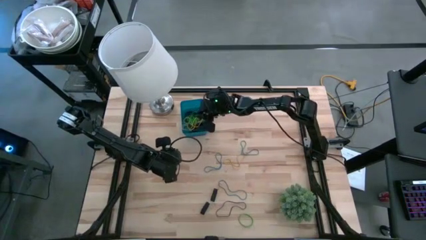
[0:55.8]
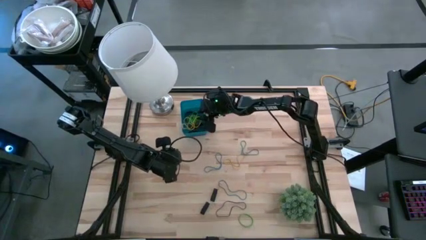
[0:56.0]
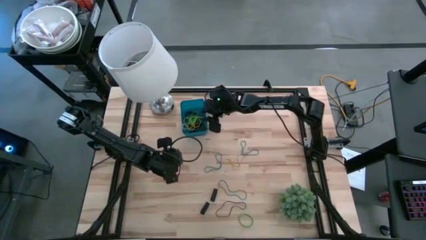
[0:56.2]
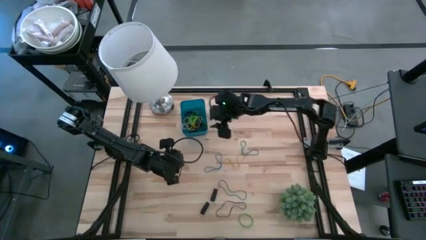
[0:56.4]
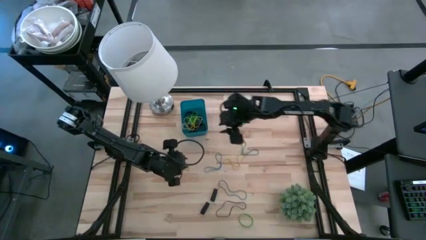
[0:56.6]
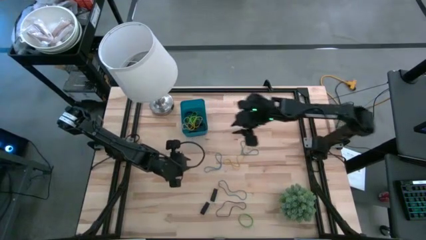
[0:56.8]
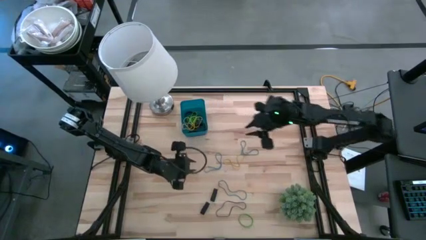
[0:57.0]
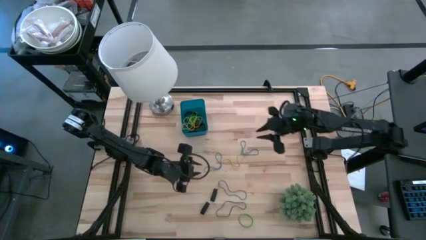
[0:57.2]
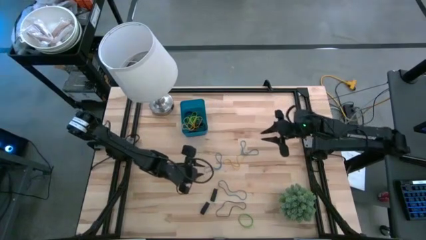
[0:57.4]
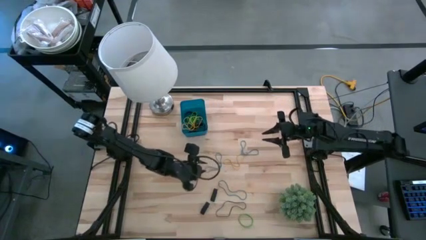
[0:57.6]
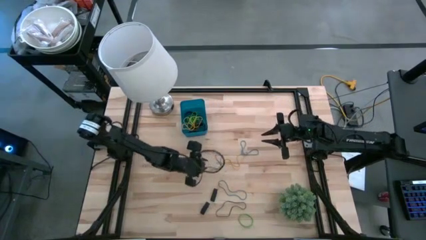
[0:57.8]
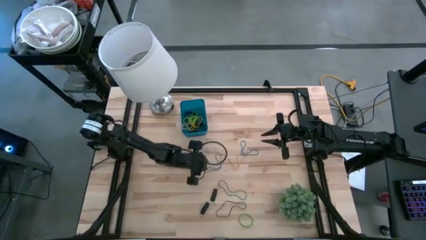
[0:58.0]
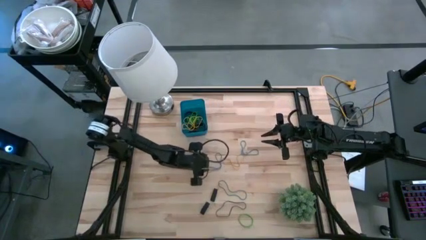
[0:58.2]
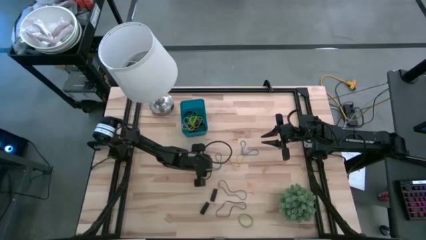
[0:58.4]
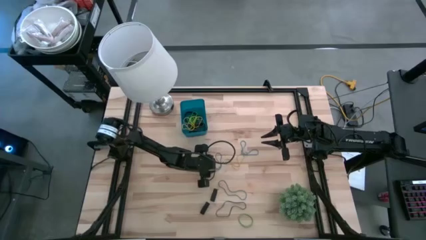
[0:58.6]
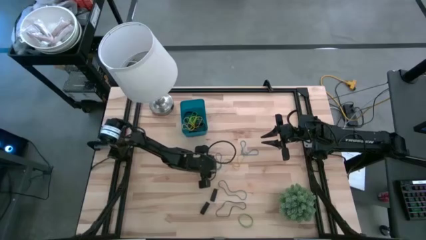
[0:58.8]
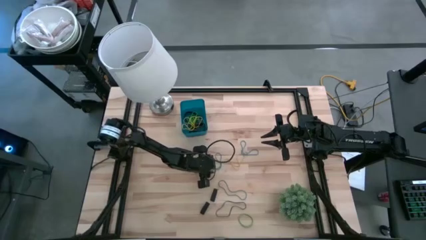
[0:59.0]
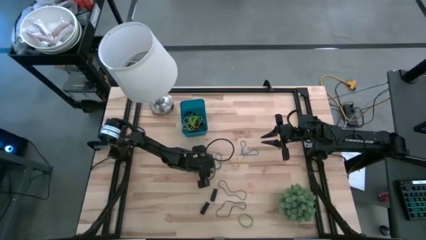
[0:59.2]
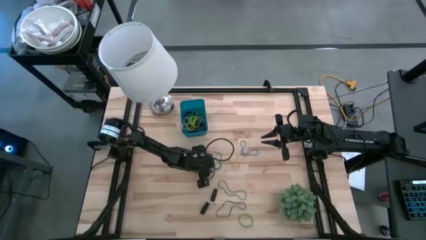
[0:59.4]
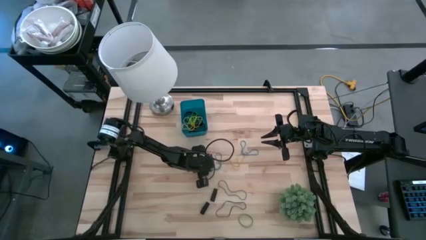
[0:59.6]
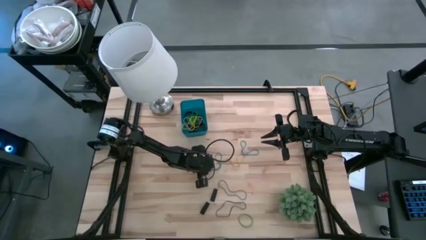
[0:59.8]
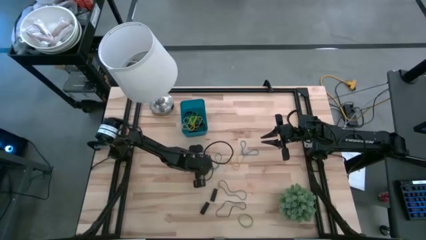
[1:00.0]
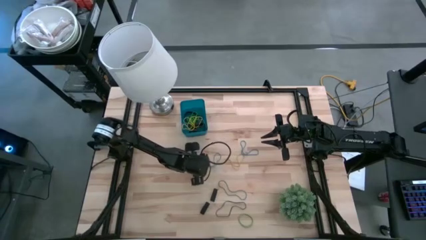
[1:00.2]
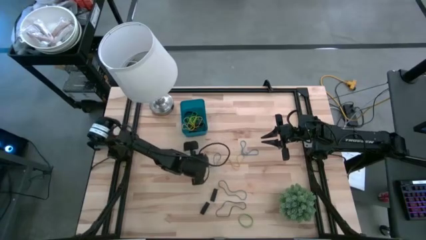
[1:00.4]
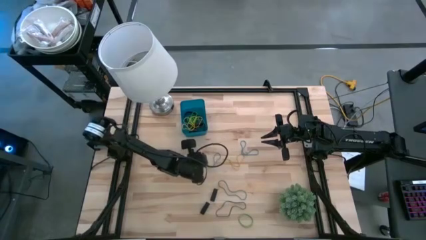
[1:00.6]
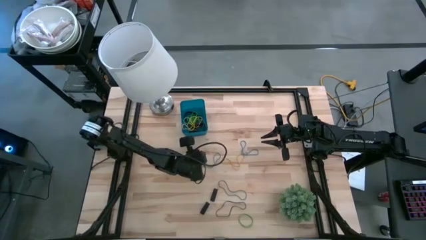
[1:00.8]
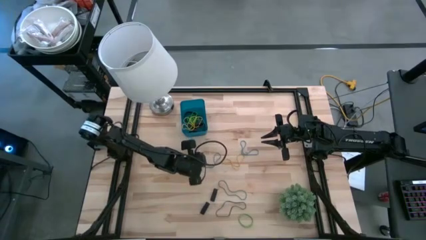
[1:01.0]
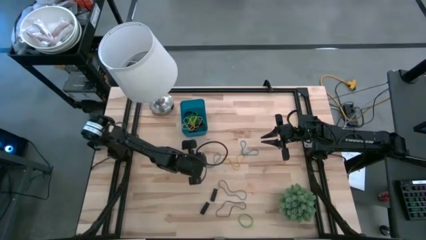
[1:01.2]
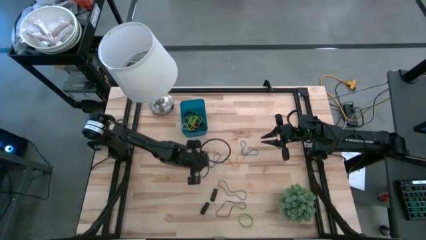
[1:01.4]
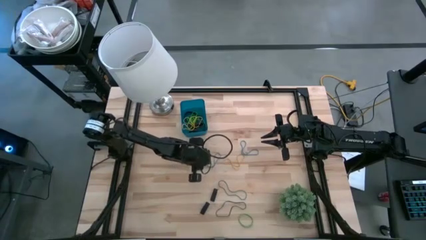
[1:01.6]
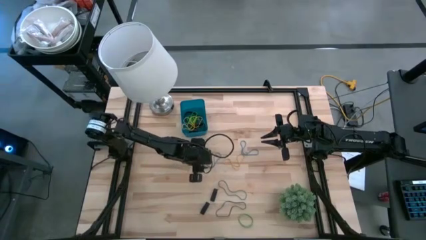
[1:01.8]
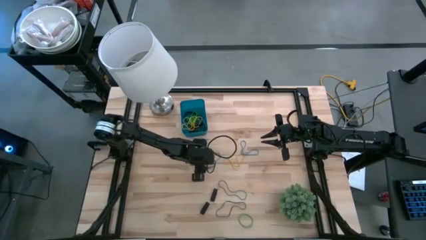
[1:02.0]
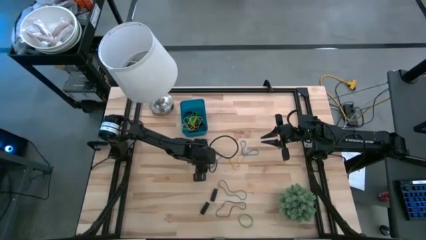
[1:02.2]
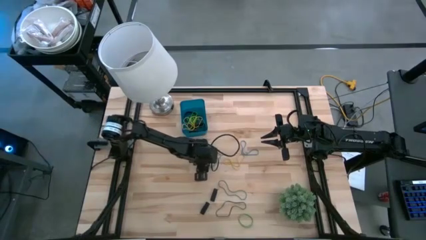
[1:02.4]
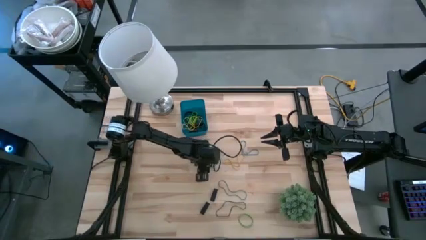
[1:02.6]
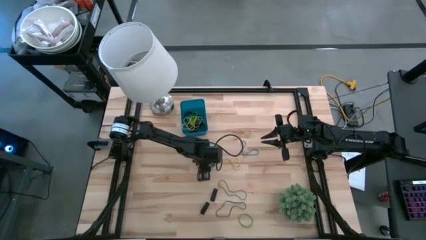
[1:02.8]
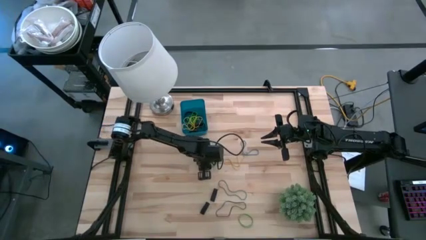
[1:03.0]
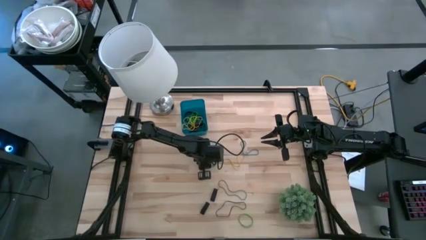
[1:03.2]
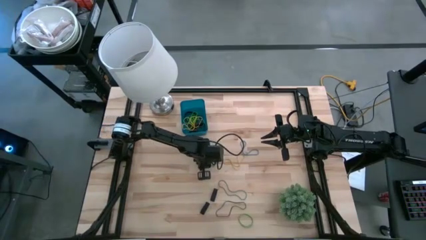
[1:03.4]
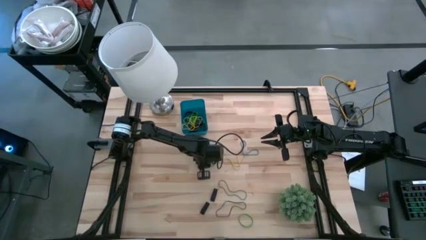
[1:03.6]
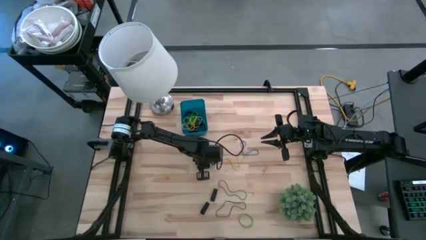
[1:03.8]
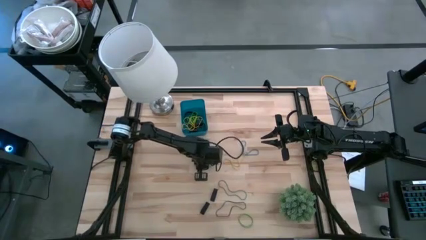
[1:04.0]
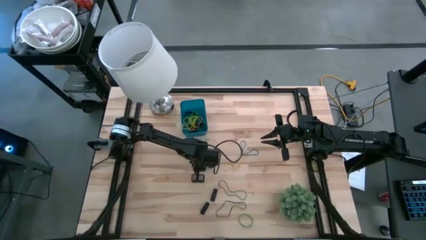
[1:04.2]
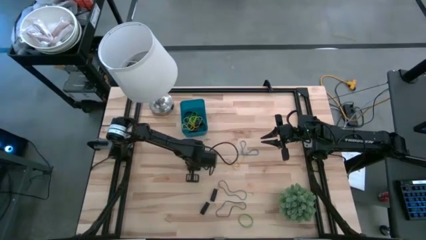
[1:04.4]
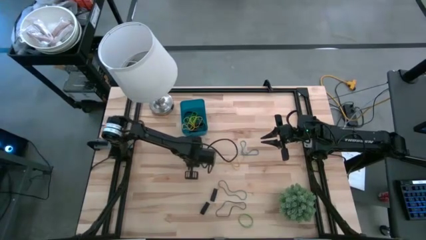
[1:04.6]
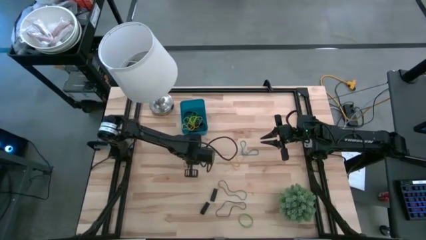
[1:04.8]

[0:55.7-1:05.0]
Task: Pick and place rubber bands into bin
Put the middle blue rubber band into the blue bin

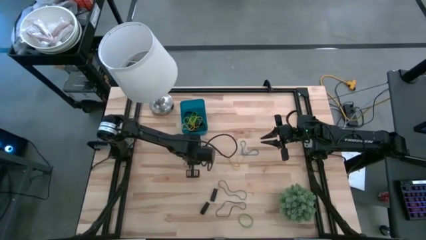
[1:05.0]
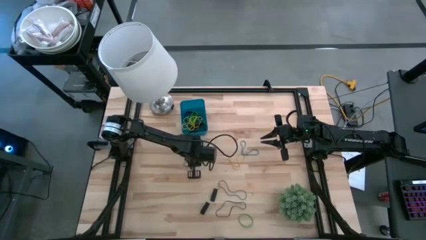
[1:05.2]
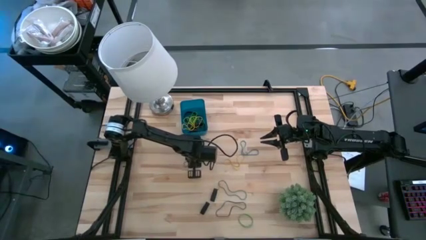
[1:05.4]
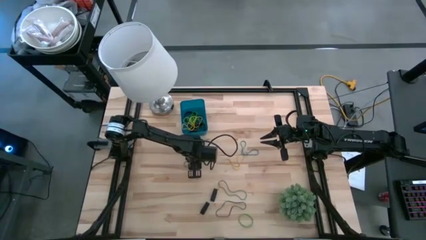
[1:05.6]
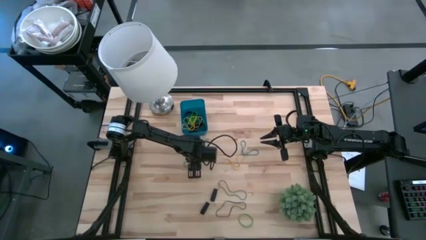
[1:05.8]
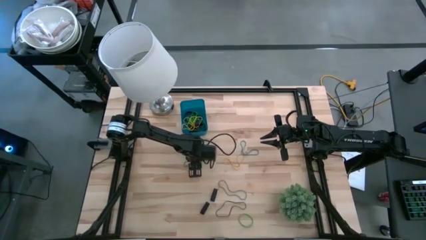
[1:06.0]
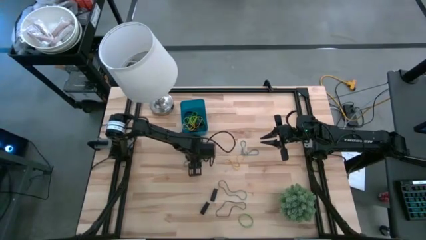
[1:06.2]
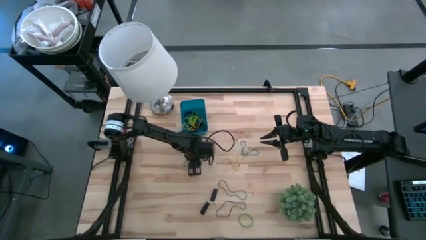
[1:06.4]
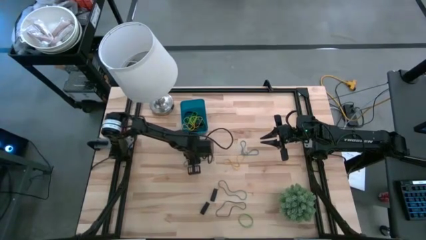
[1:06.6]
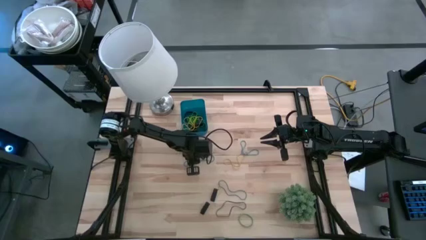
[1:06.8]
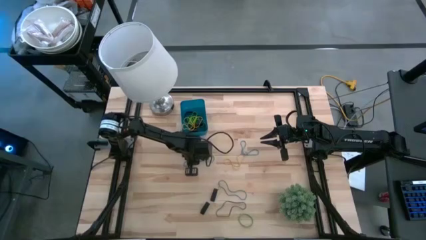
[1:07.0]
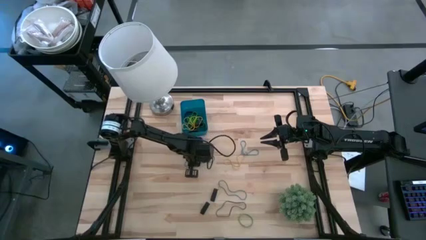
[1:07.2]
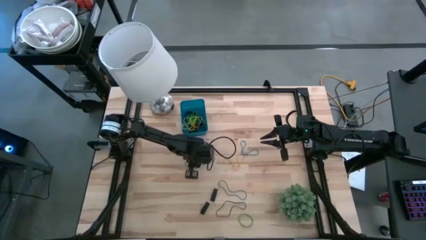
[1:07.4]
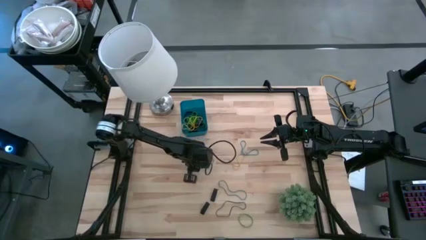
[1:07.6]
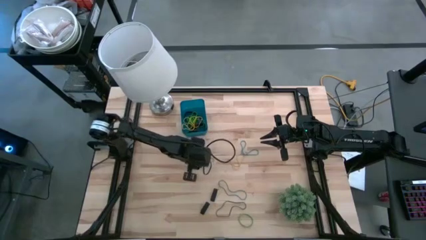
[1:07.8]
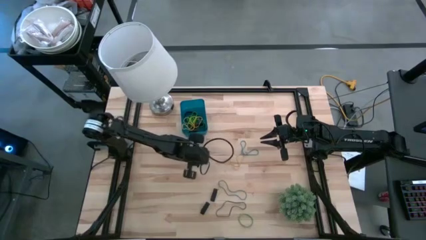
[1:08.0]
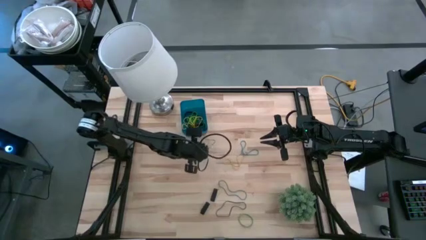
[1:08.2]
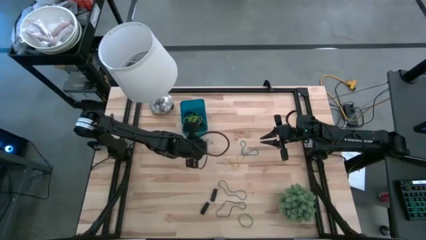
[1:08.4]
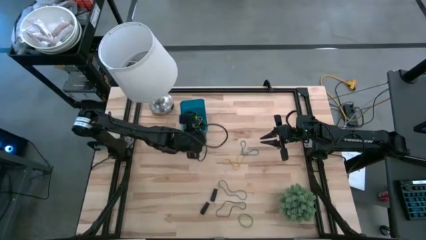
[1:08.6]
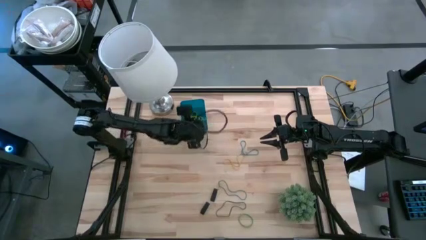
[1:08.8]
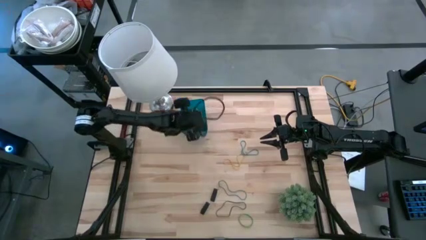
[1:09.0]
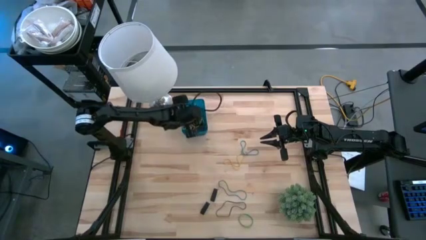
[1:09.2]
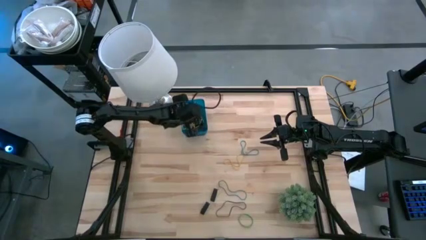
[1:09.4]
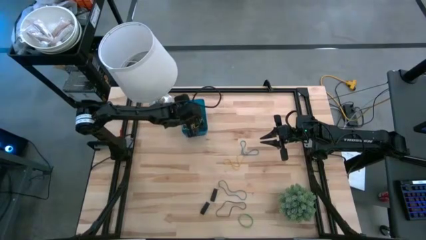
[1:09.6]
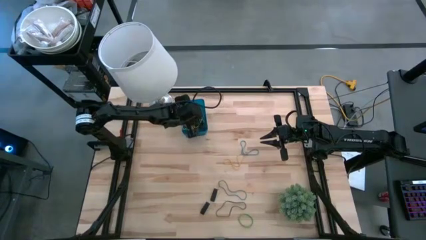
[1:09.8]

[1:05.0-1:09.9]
Put the middle blue rubber band into the blue bin

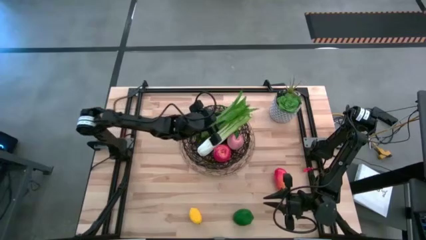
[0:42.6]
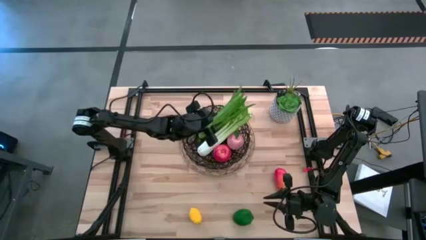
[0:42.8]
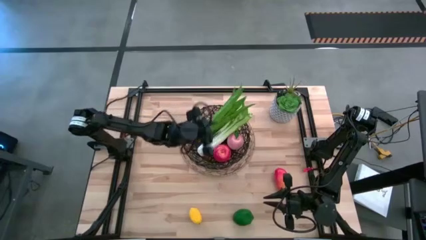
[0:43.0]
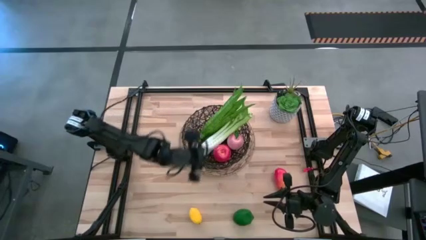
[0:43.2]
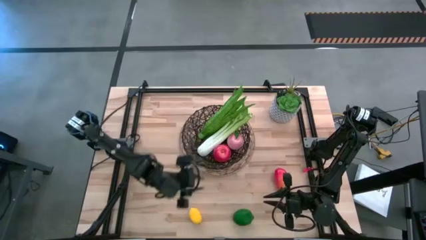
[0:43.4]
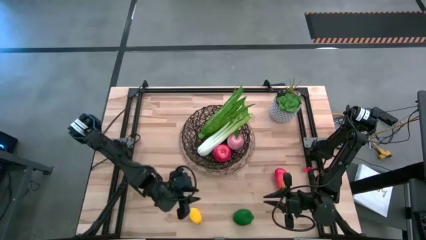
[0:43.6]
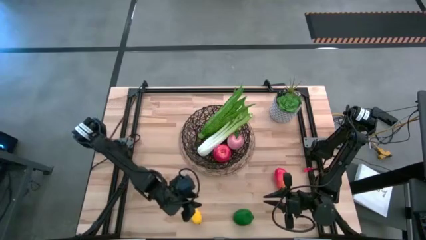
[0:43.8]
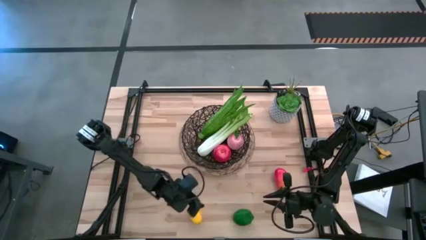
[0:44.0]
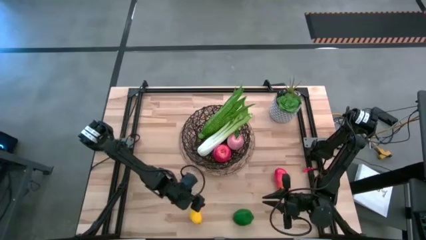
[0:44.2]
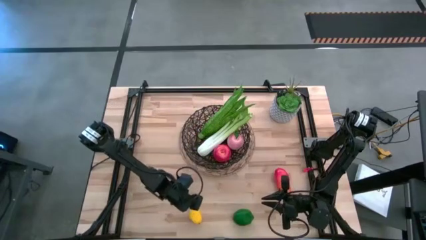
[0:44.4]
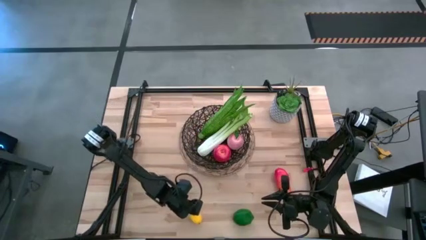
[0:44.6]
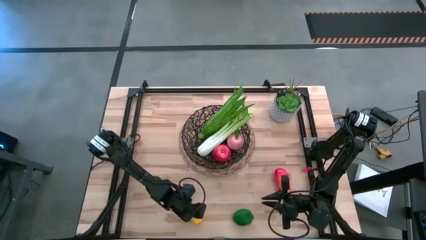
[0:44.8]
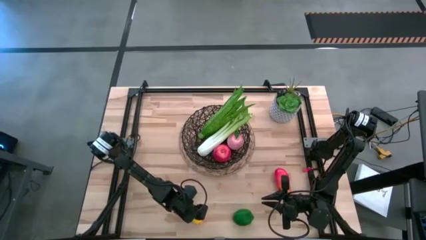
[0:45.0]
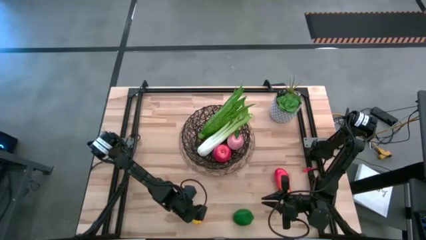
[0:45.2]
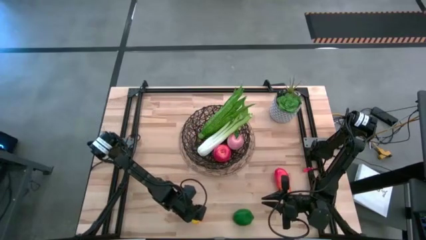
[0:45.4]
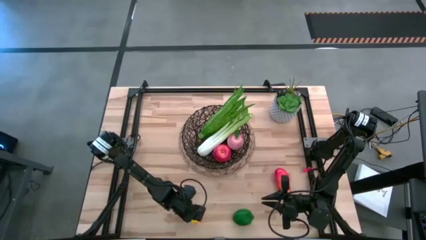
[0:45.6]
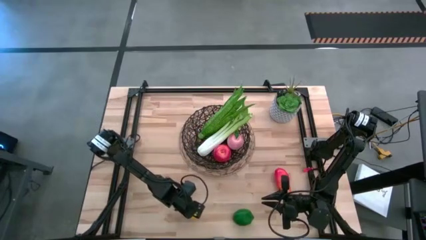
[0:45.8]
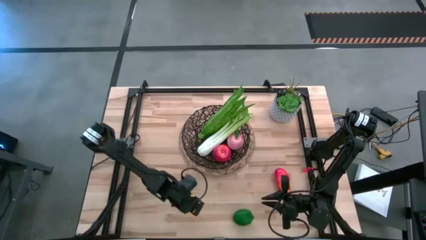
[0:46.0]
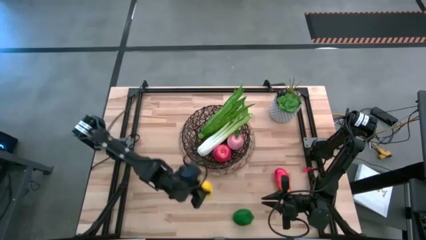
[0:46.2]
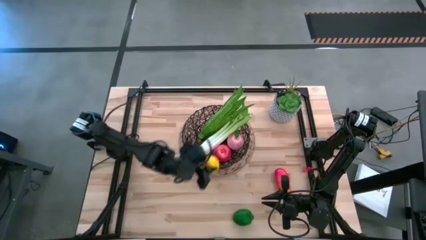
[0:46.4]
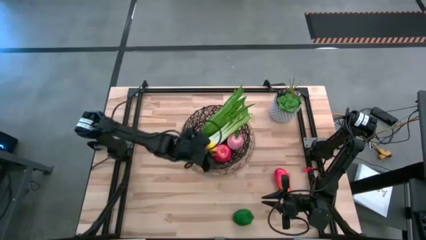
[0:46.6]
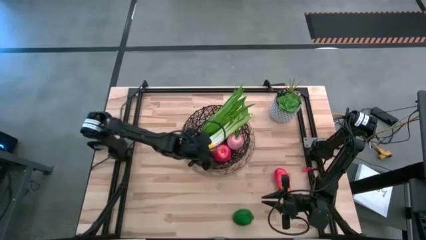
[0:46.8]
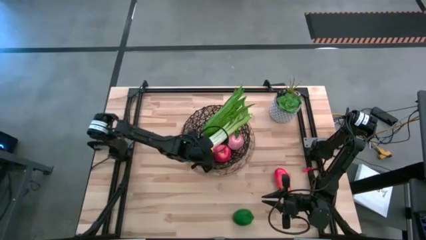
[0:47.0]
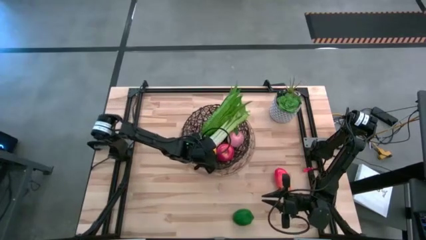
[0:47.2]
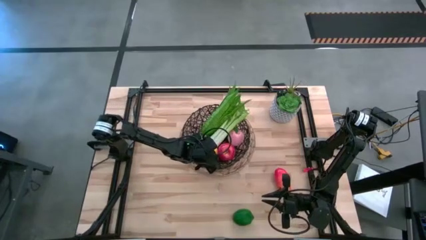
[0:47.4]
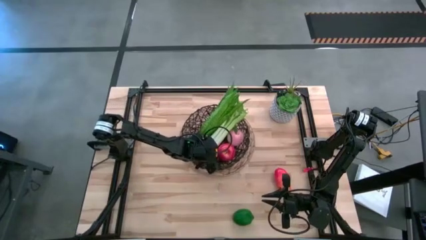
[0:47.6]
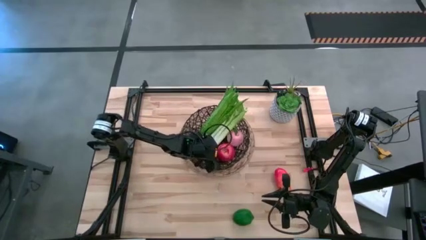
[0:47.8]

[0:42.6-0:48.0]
Task: Build produce basket
Put the yellow lemon into the black mesh basket
